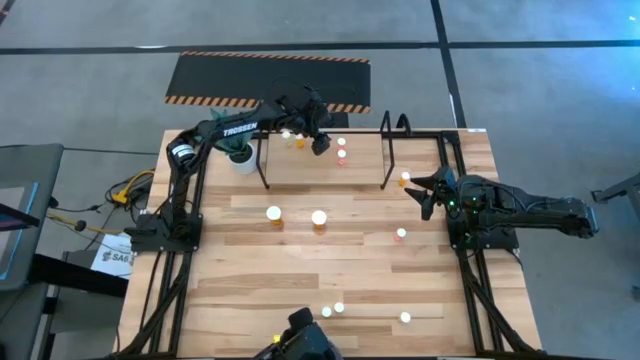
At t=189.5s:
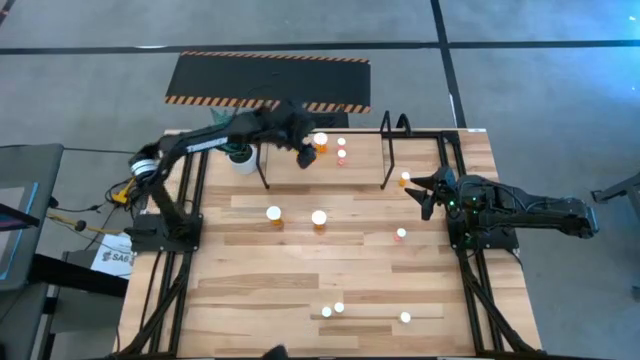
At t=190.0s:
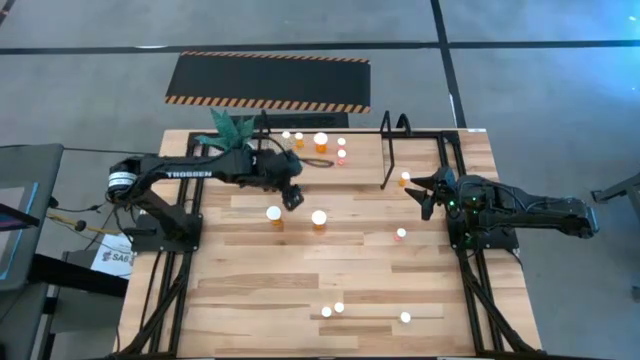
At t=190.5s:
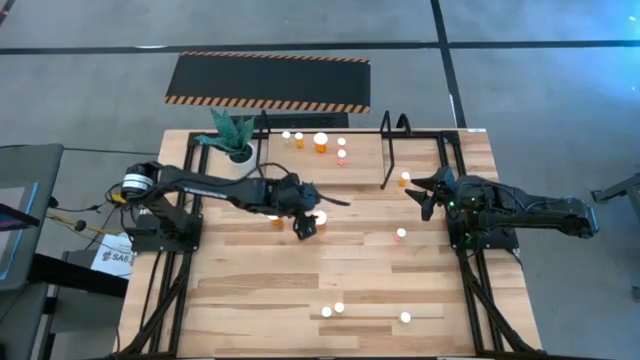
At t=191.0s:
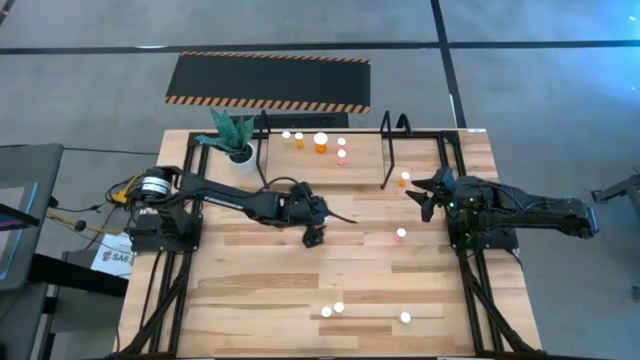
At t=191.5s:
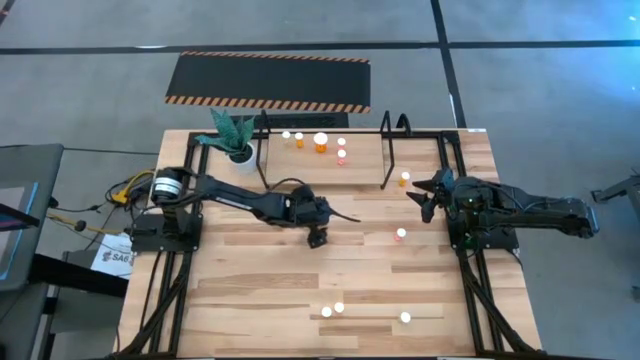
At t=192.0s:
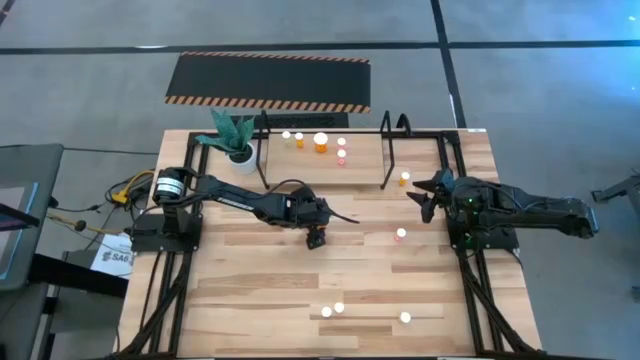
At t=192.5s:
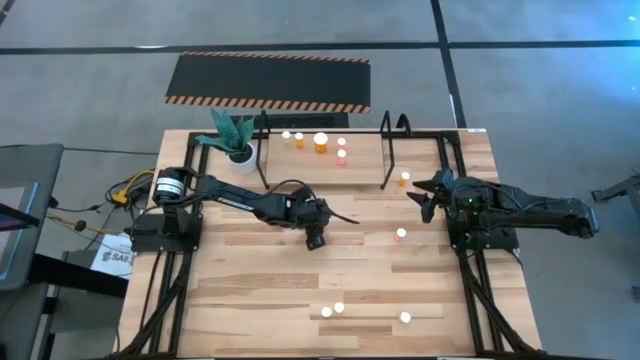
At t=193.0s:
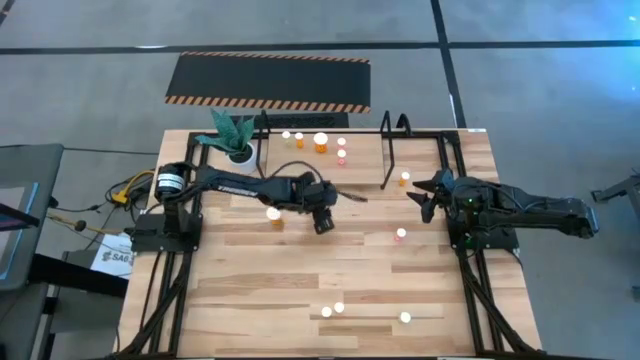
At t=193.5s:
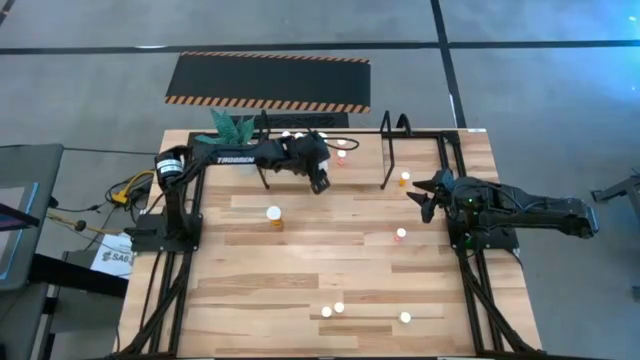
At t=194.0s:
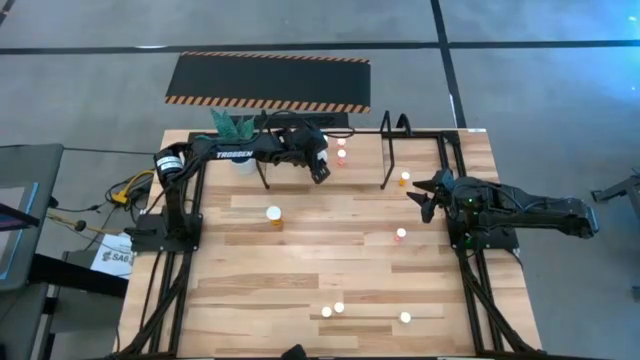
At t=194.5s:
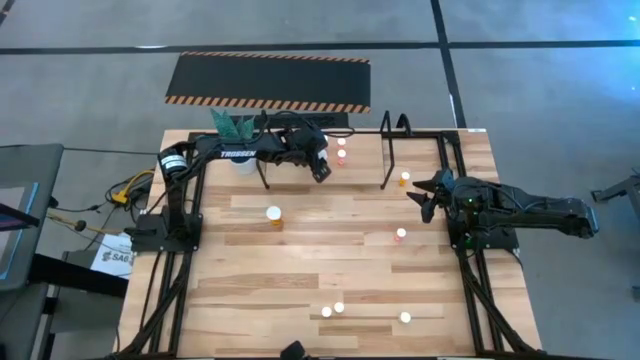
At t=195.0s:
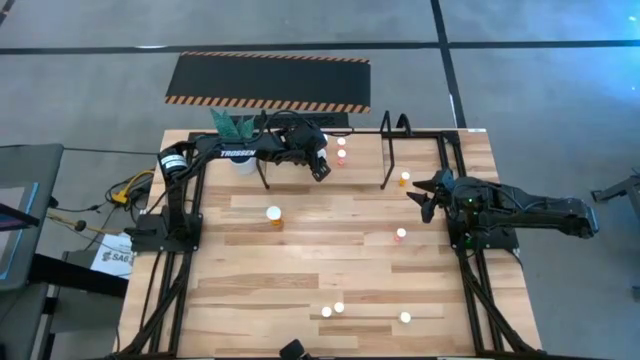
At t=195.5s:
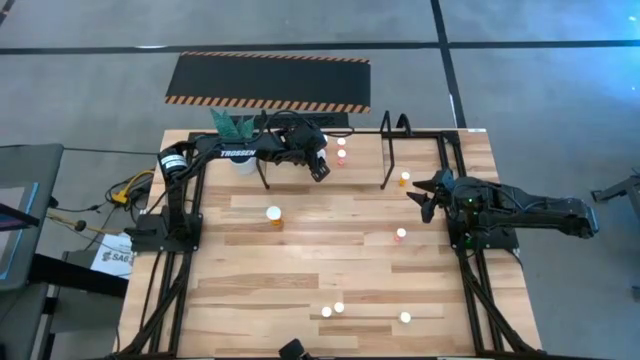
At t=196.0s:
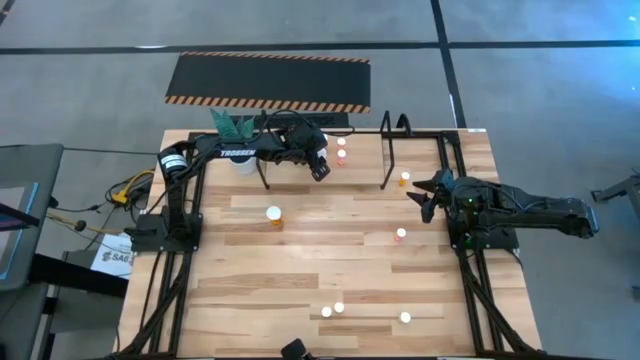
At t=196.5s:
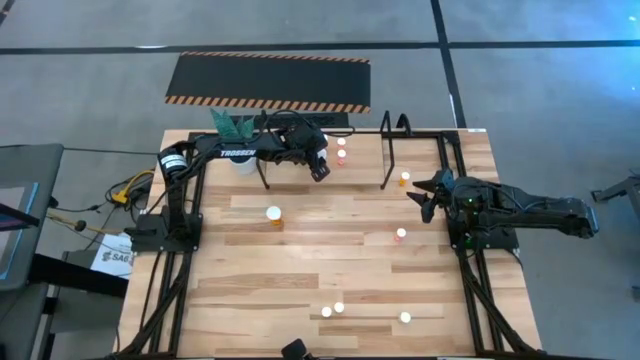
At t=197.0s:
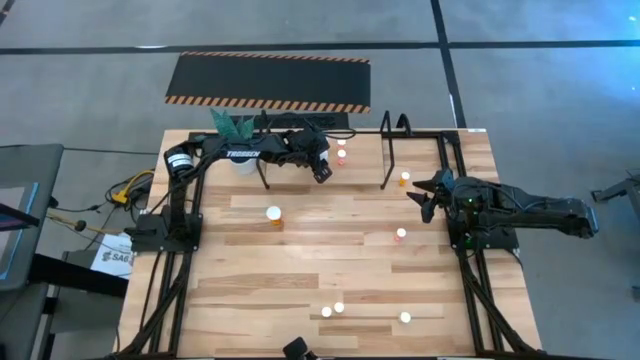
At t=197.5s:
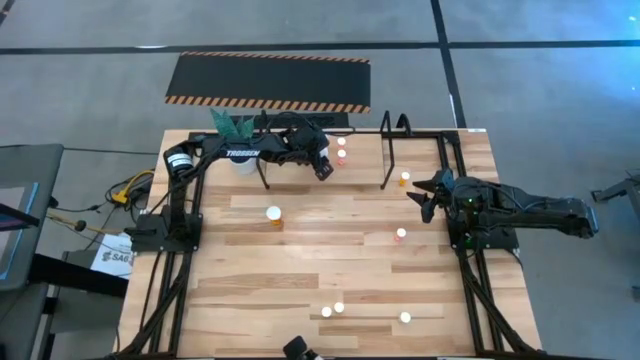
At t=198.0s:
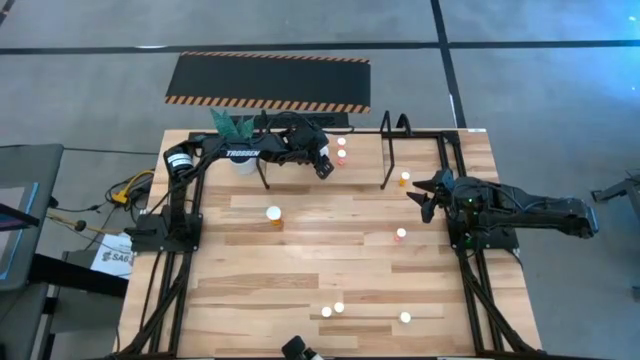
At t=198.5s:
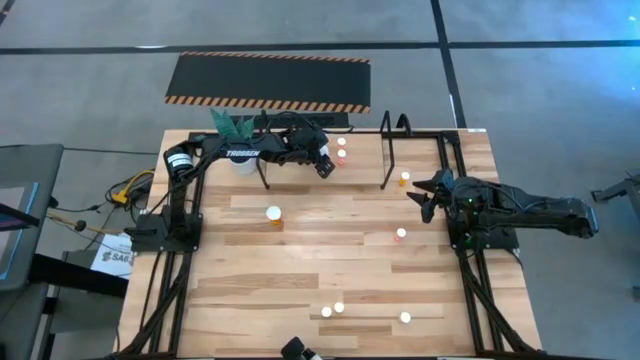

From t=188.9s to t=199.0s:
Task: Pick and place medicine bottles onto shelf by color
Put the right big orange pill bottle on the shelf aligned with the other big orange pill bottle

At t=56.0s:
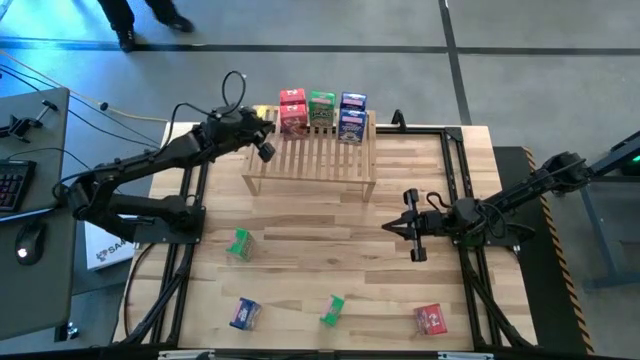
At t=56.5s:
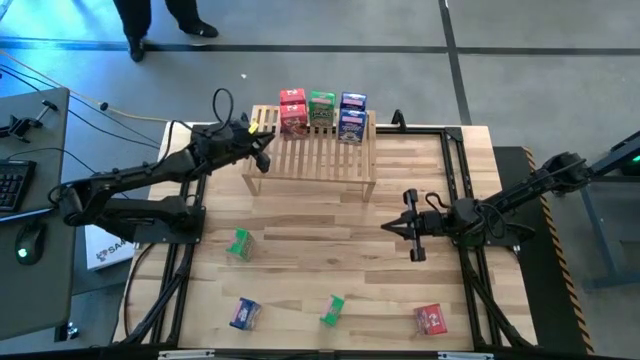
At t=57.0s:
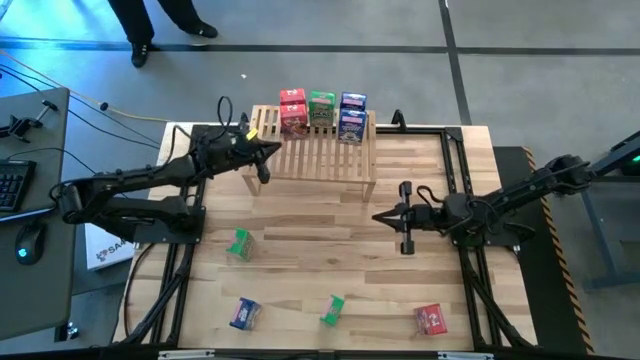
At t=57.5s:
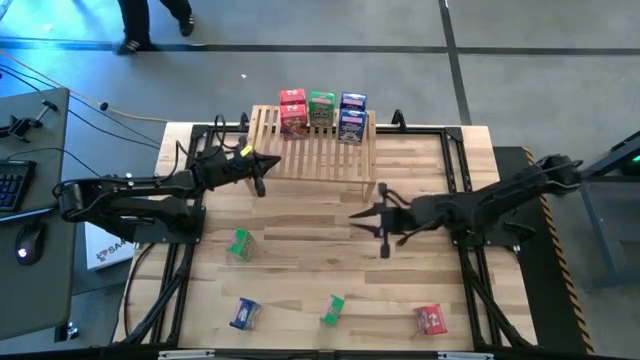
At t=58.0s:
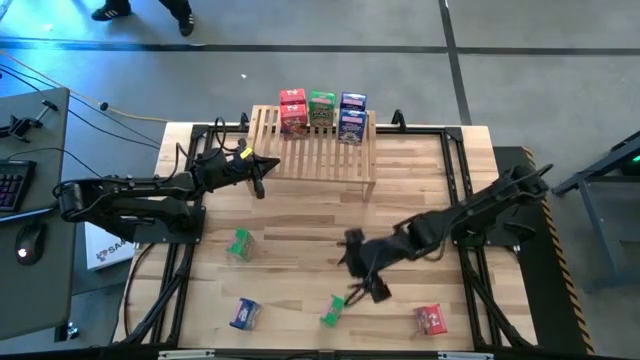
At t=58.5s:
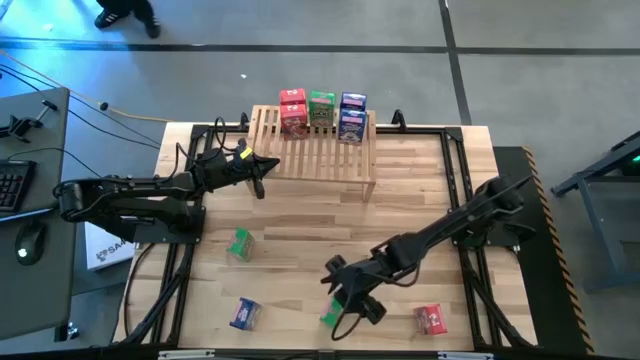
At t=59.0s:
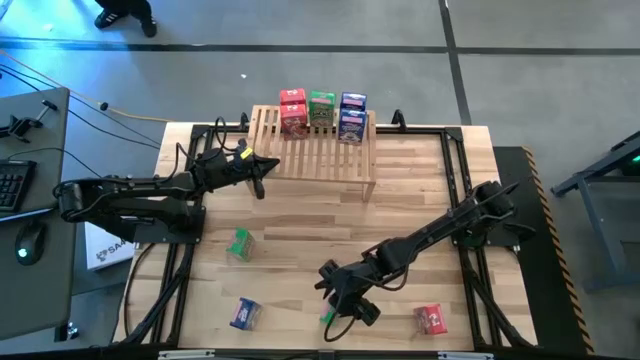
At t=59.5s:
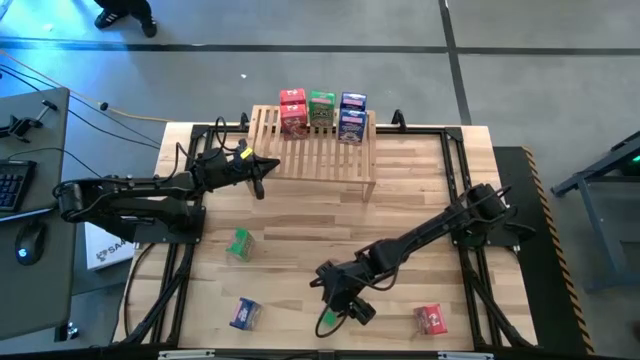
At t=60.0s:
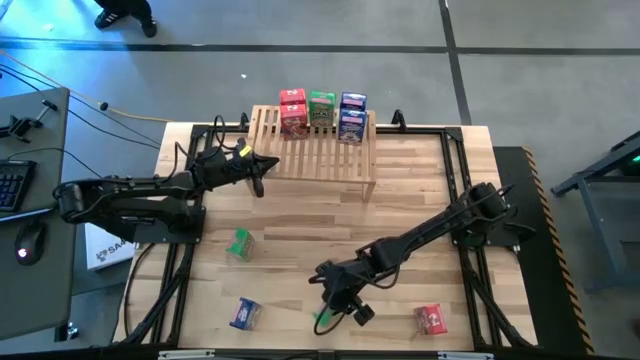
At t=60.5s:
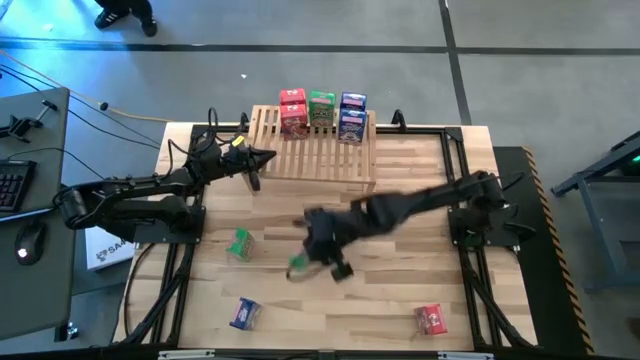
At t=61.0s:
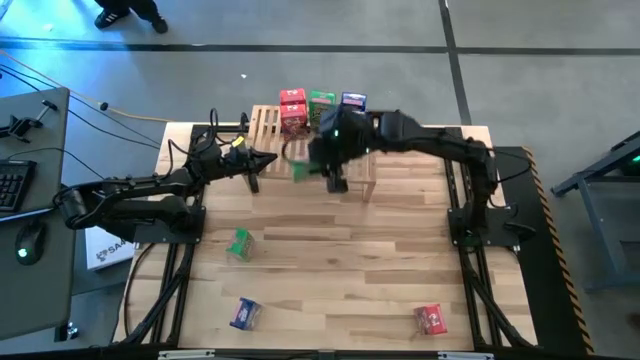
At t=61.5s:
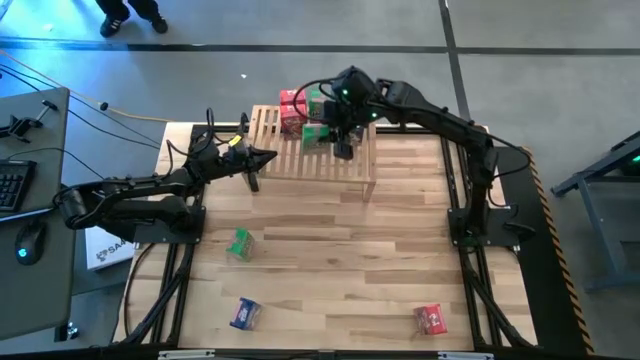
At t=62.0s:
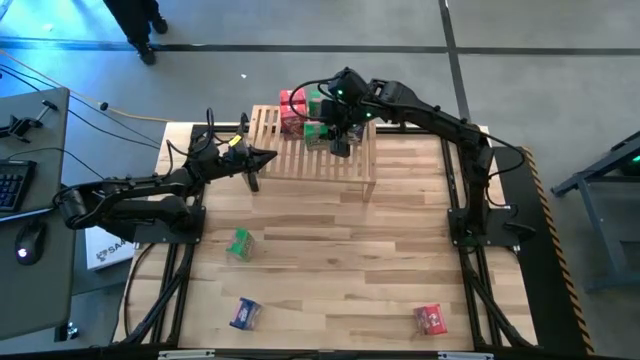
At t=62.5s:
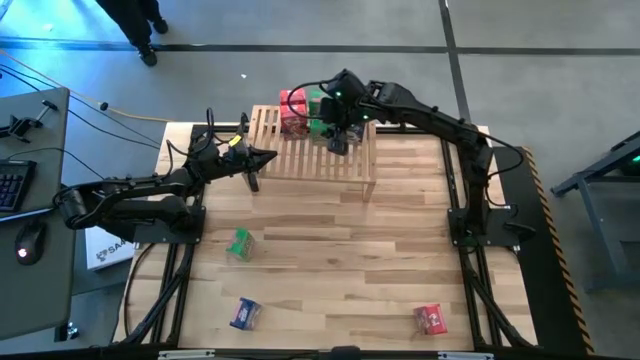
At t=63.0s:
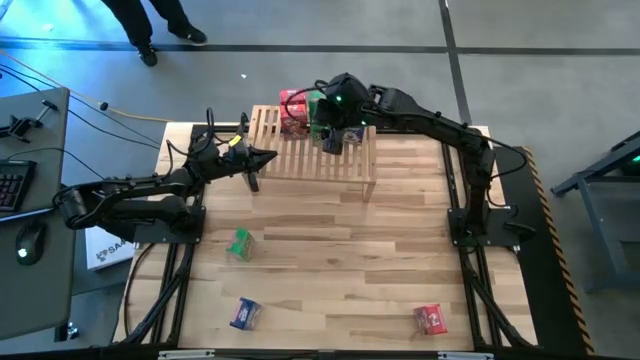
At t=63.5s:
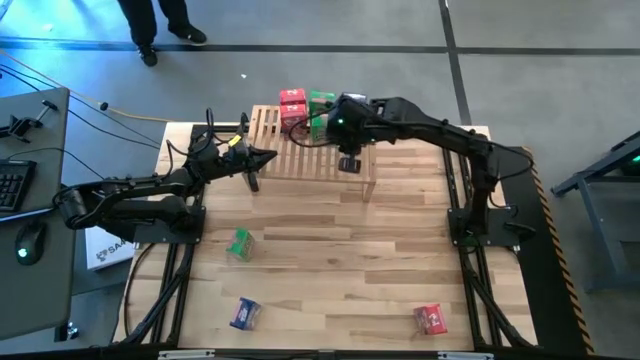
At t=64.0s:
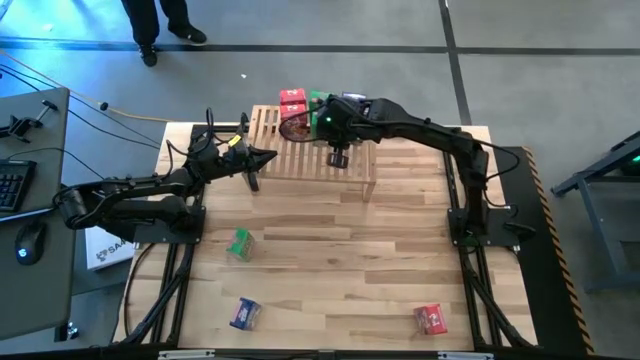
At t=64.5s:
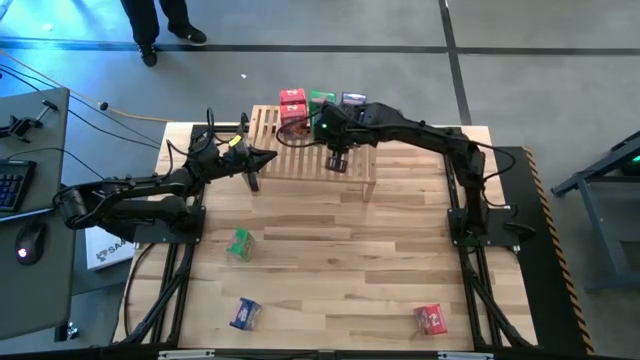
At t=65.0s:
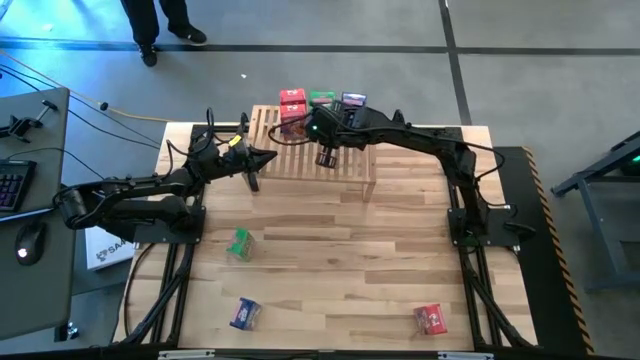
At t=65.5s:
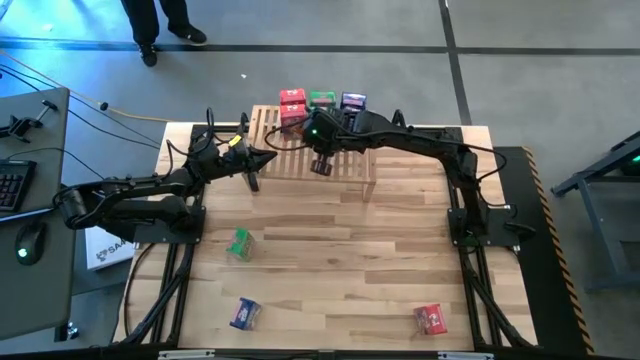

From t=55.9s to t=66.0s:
Task: Stack cereal on shelf
Put the bottom green cereal box on the shelf aligned with the other green cereal box
